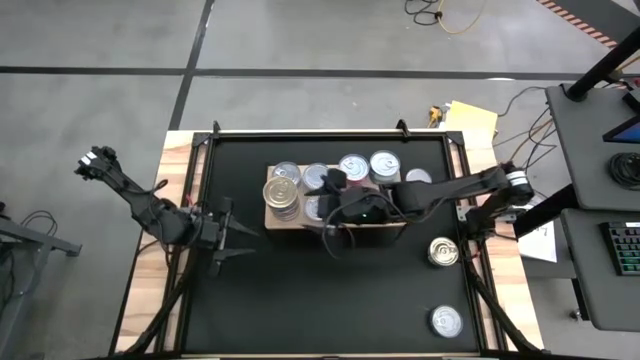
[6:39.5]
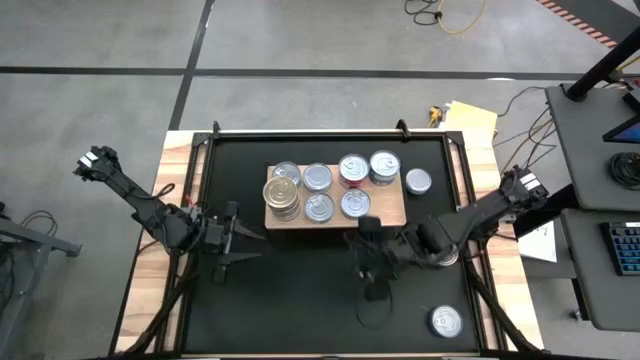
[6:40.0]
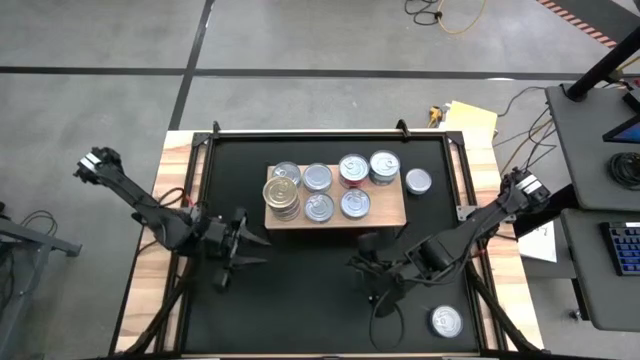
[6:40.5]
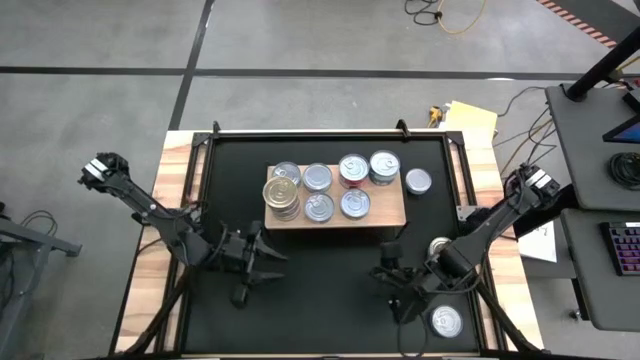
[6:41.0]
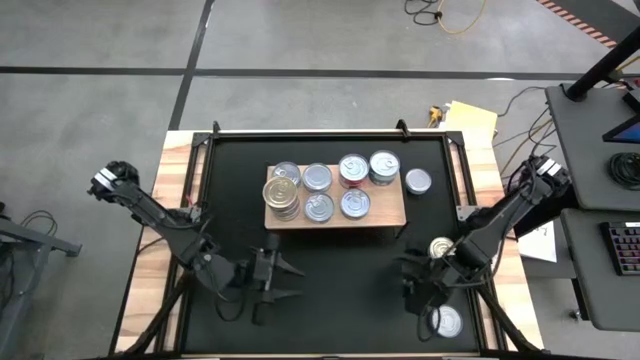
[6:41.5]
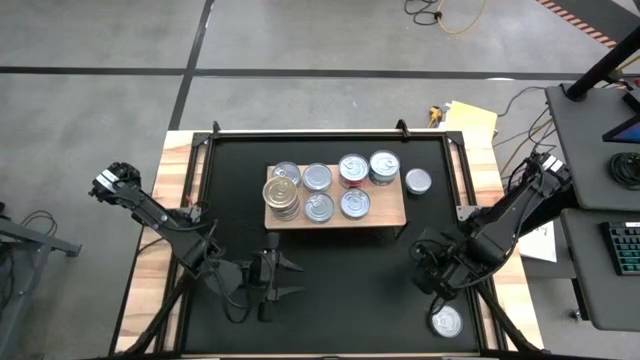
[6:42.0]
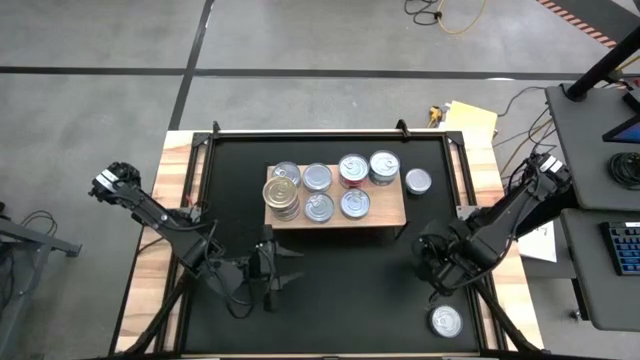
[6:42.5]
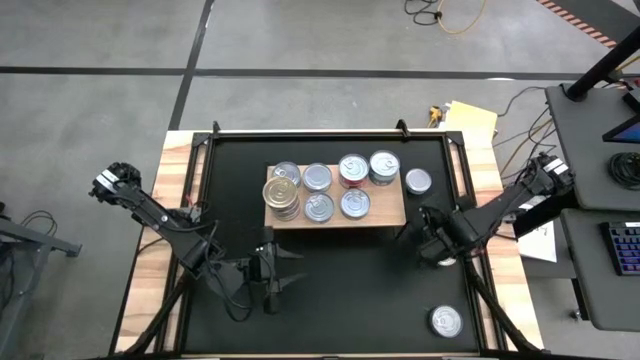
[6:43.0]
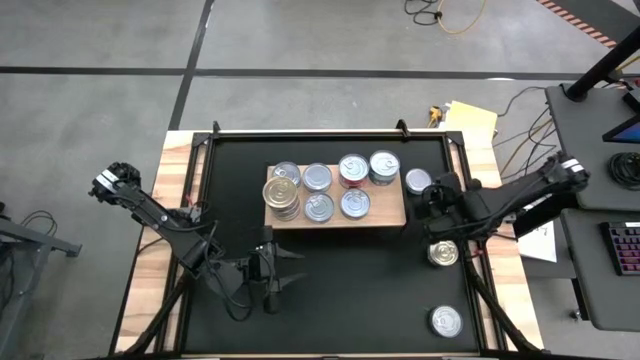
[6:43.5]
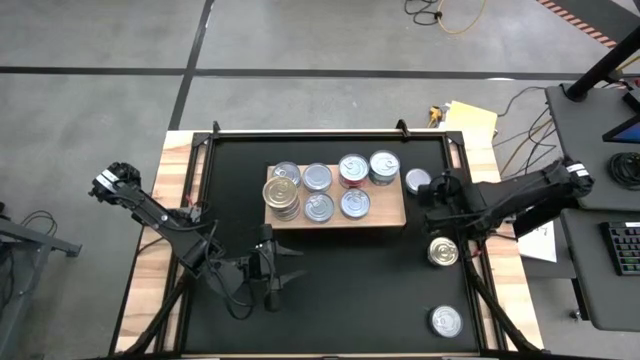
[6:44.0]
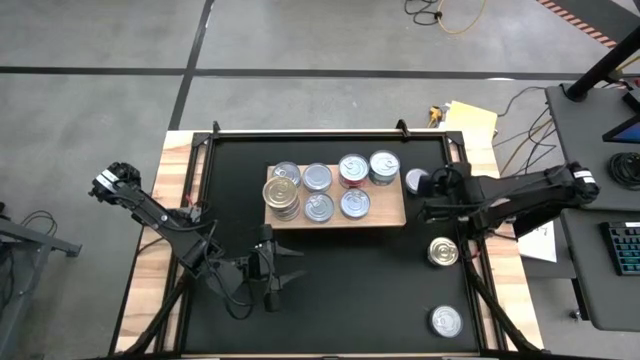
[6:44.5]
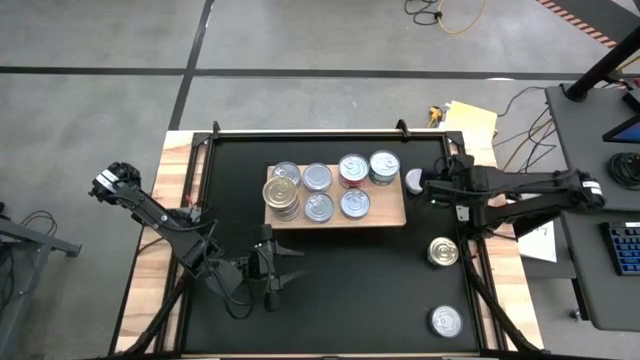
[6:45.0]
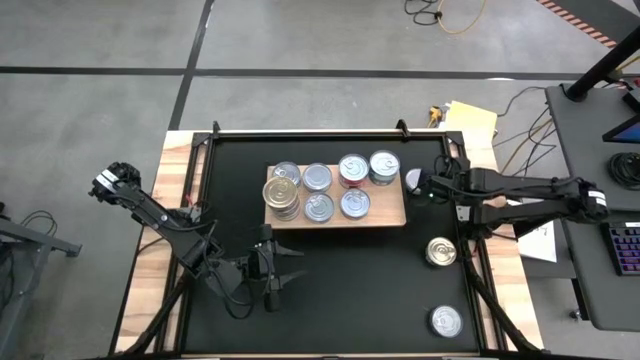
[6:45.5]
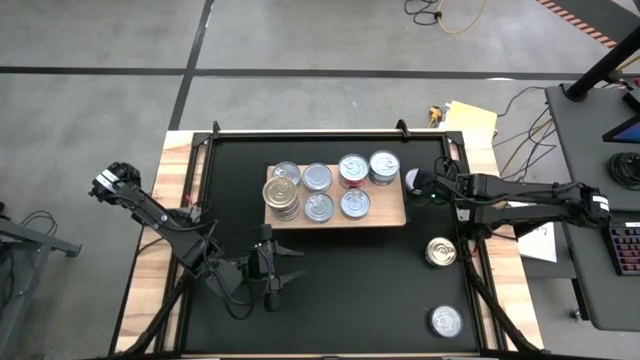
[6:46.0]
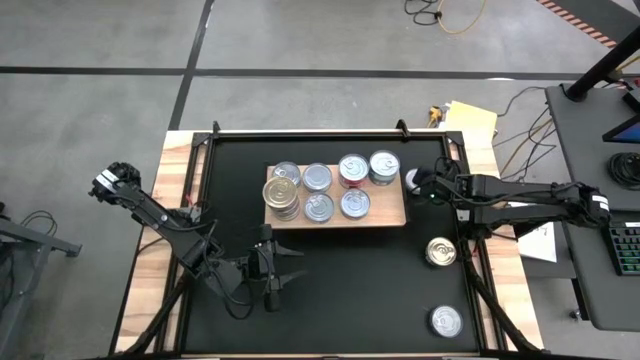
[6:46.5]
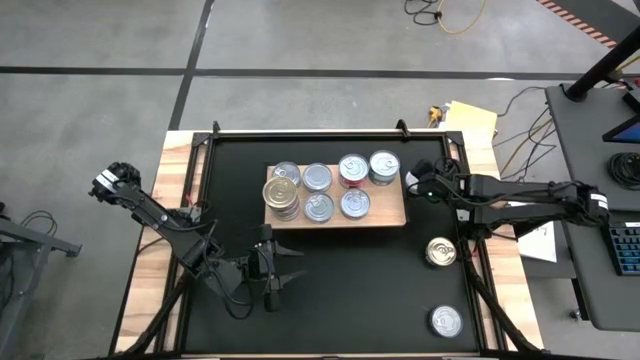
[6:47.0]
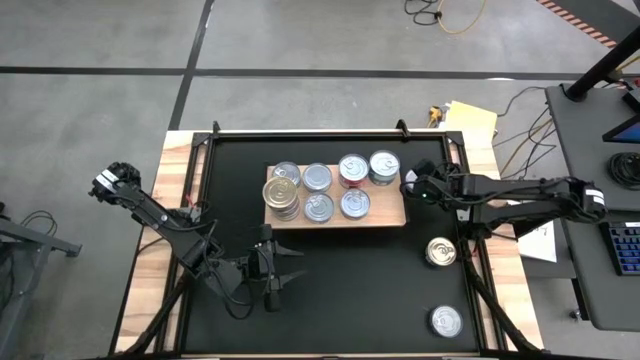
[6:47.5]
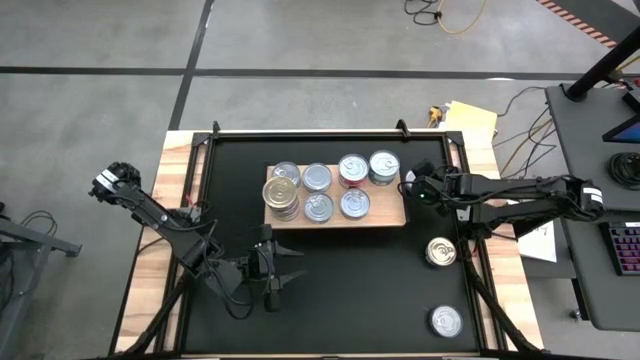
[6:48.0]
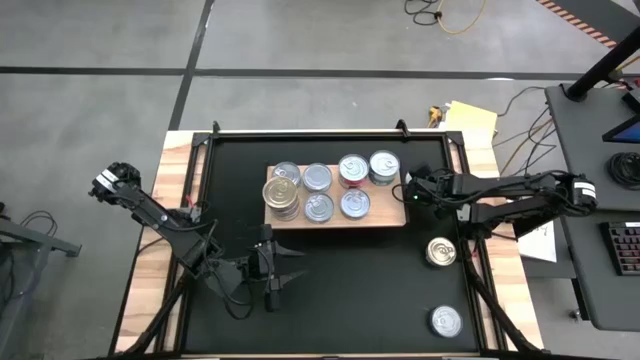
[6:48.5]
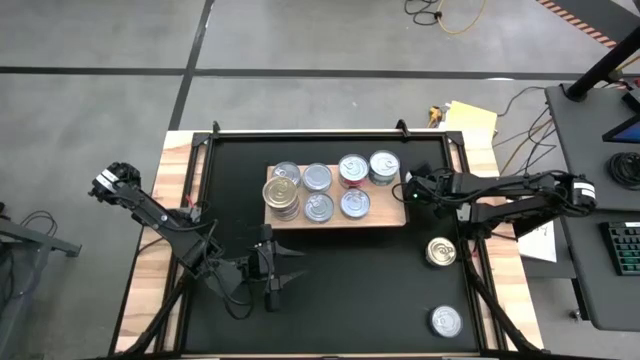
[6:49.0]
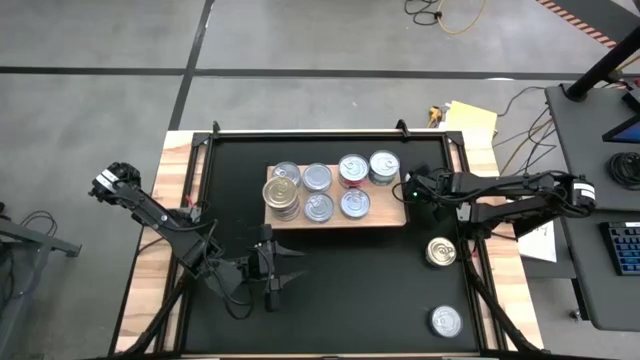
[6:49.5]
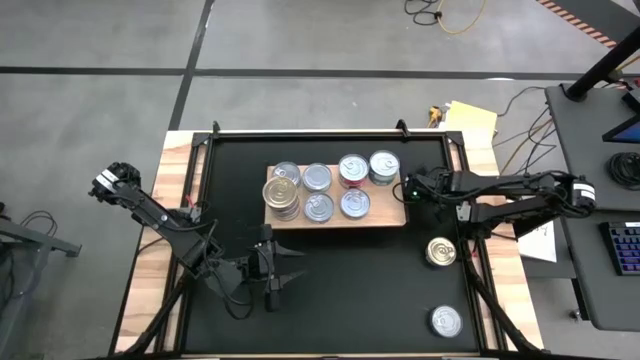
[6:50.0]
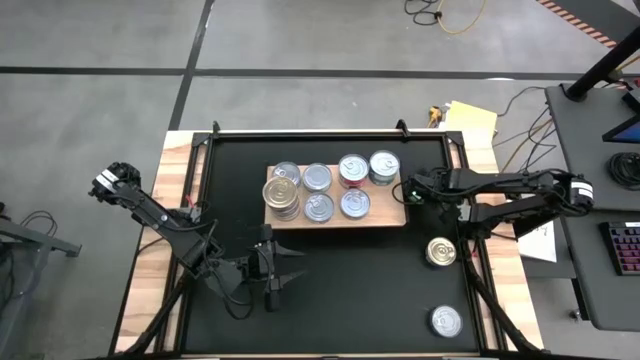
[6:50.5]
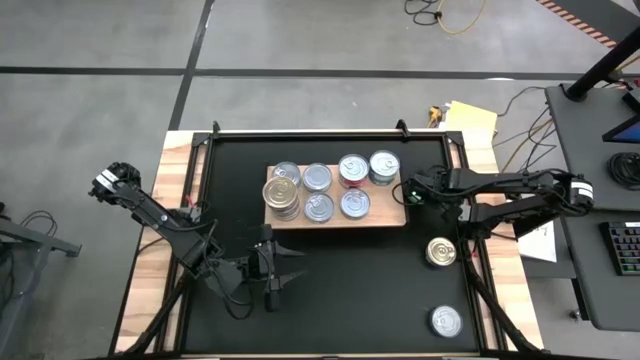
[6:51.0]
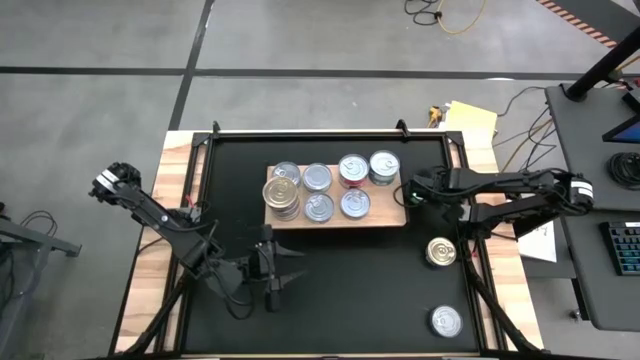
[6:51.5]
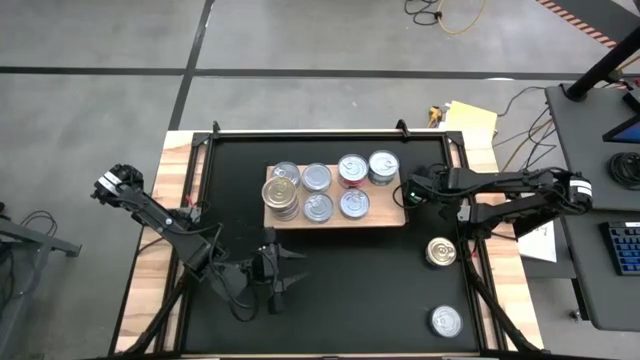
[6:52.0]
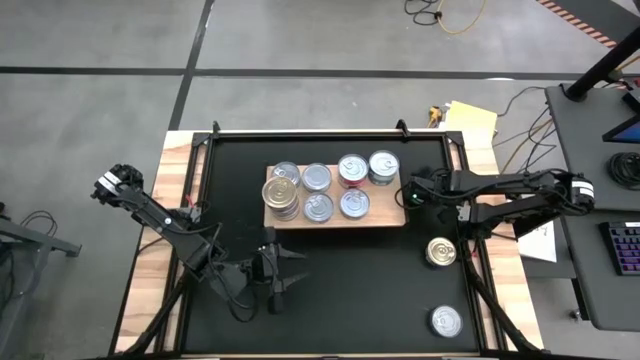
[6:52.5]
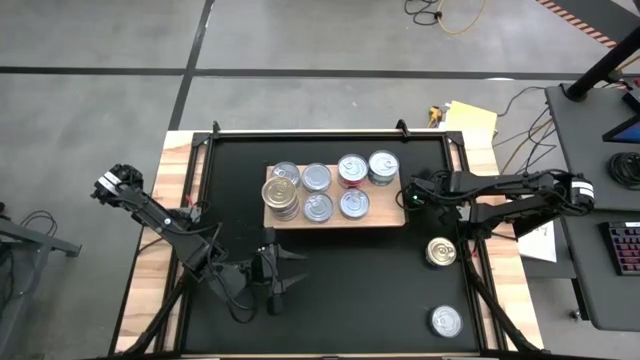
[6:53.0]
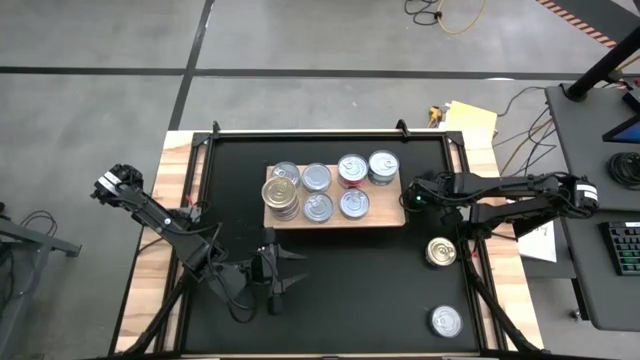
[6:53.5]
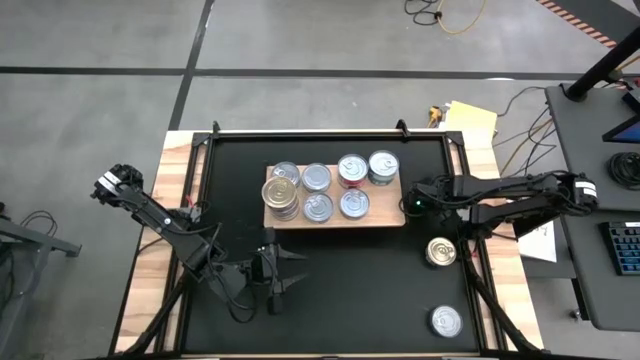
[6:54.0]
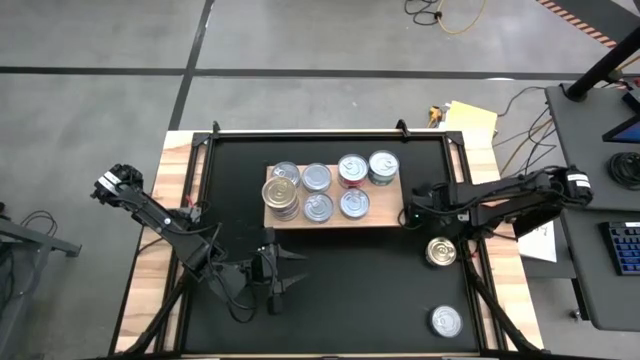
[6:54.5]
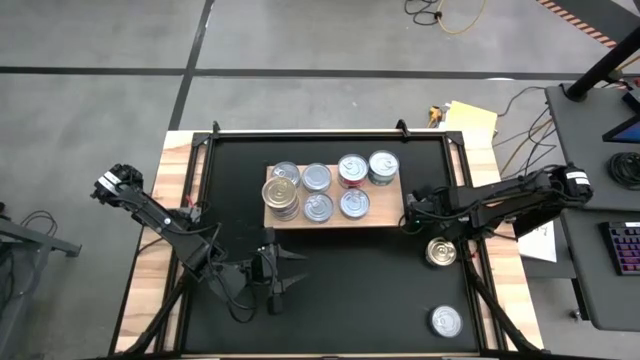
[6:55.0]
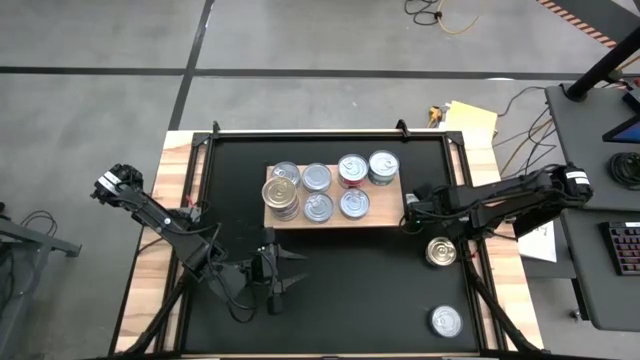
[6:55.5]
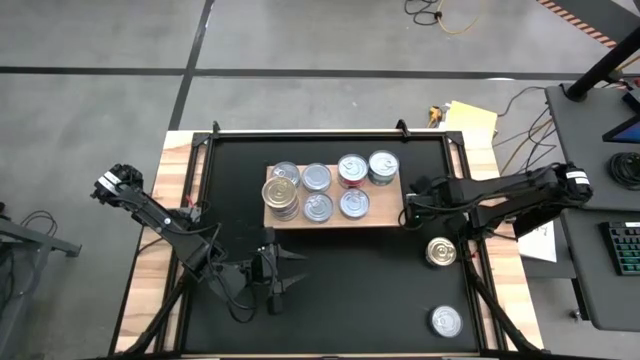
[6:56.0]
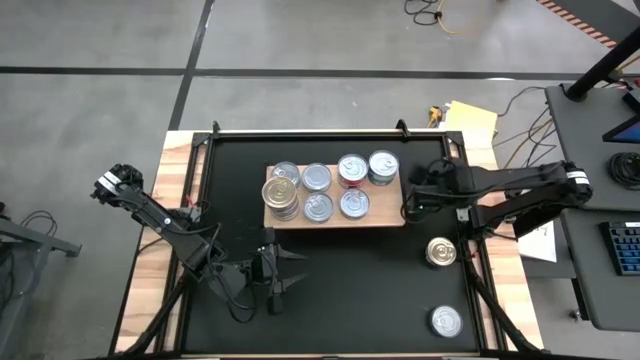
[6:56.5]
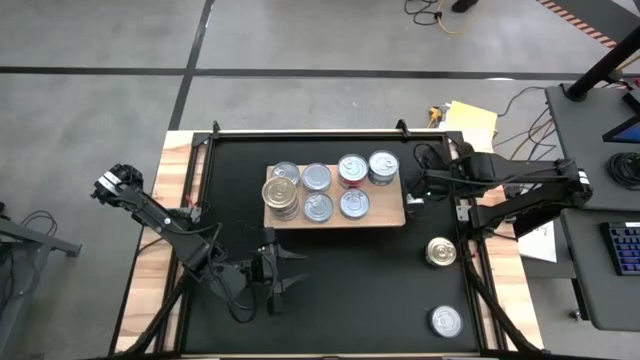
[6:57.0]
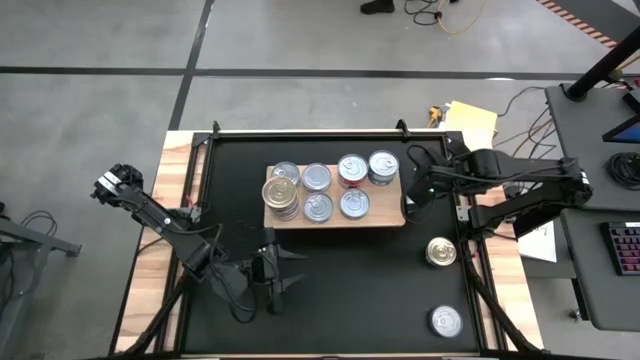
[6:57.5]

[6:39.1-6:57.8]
Task: Stack canned seafood by type on shelf
Stack the green tuna can on the green tuna can
